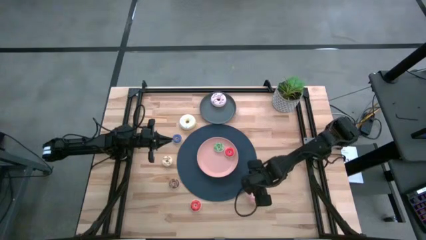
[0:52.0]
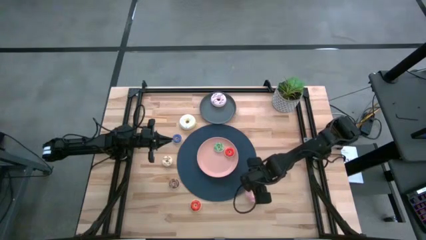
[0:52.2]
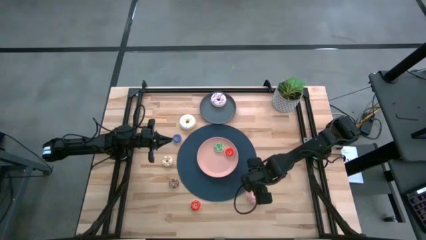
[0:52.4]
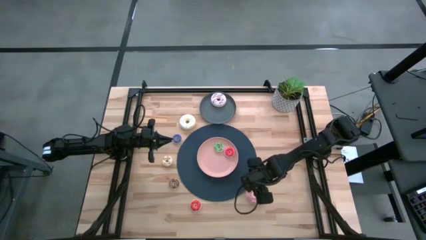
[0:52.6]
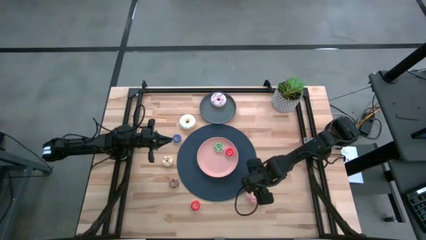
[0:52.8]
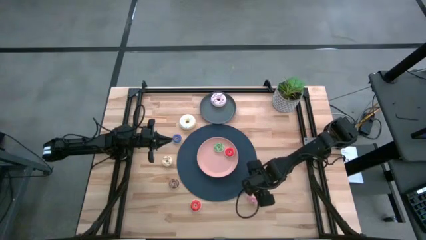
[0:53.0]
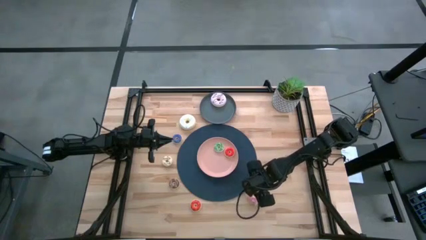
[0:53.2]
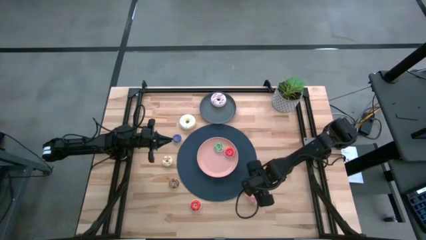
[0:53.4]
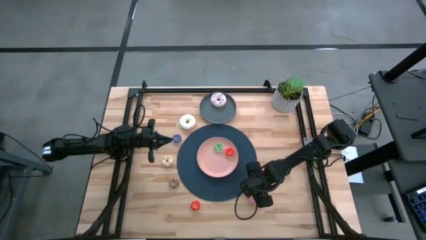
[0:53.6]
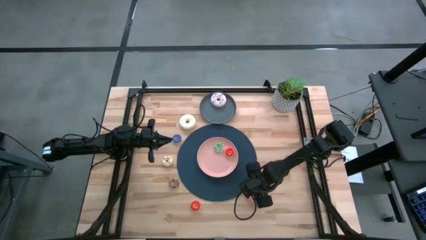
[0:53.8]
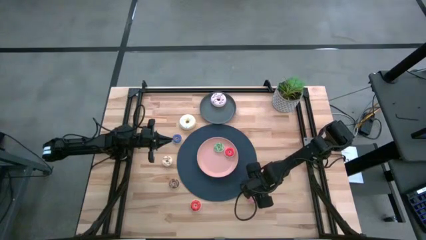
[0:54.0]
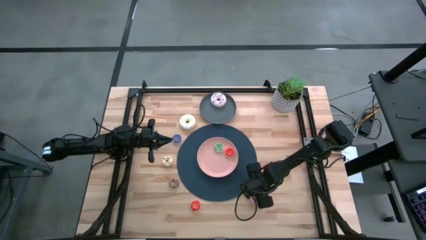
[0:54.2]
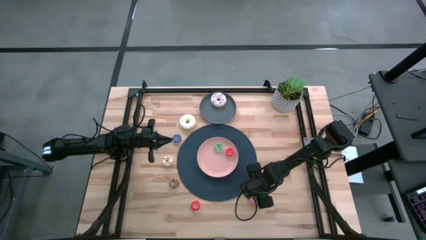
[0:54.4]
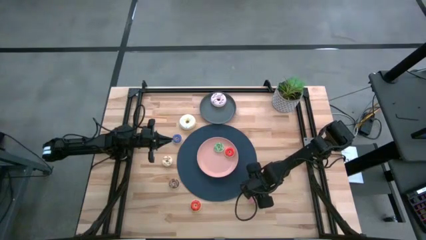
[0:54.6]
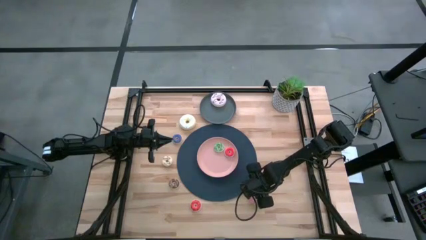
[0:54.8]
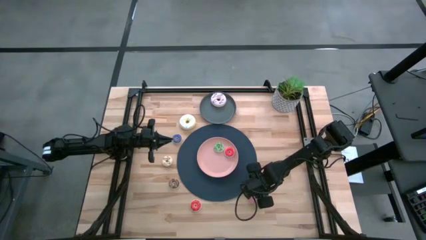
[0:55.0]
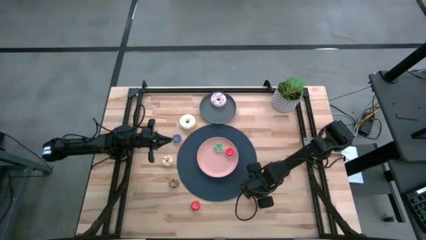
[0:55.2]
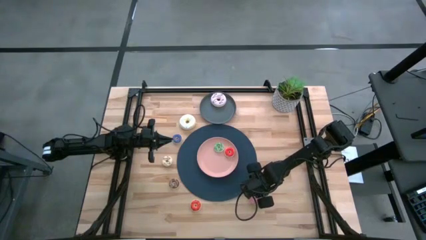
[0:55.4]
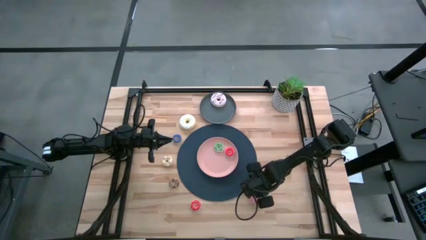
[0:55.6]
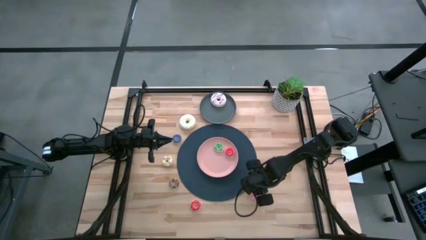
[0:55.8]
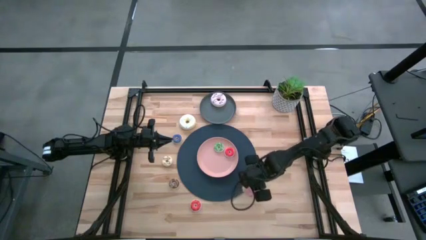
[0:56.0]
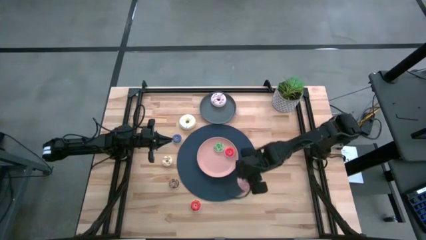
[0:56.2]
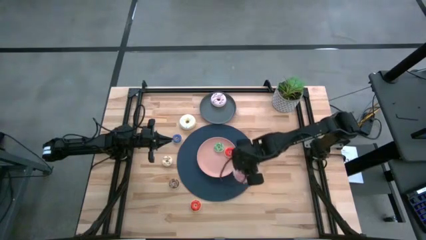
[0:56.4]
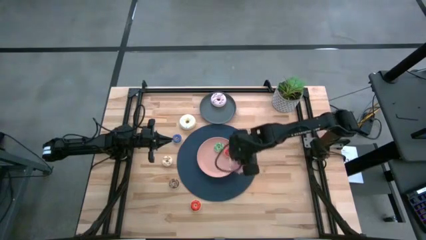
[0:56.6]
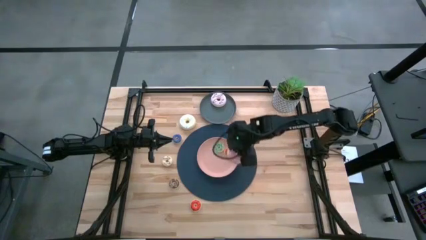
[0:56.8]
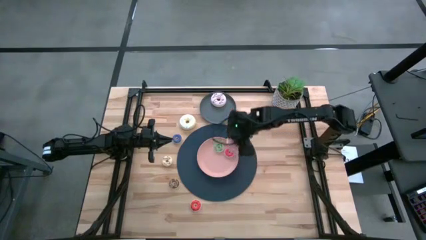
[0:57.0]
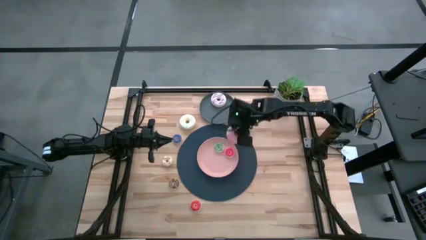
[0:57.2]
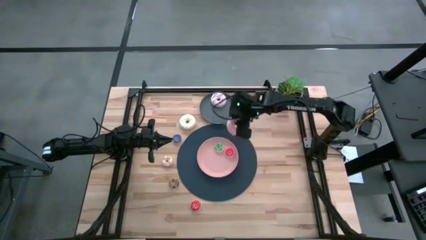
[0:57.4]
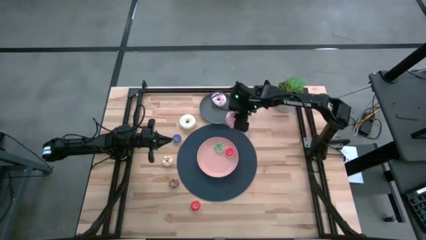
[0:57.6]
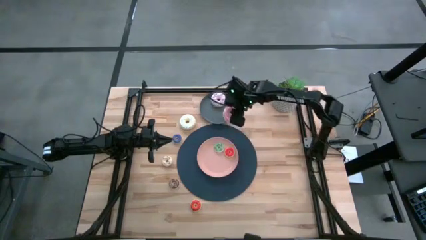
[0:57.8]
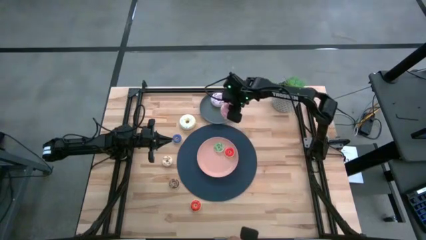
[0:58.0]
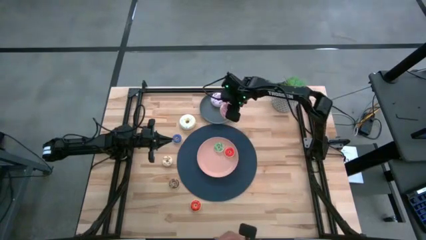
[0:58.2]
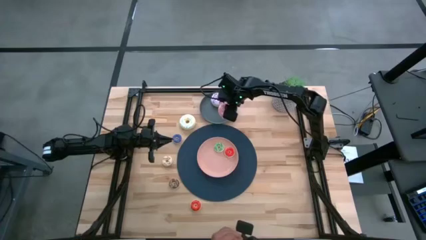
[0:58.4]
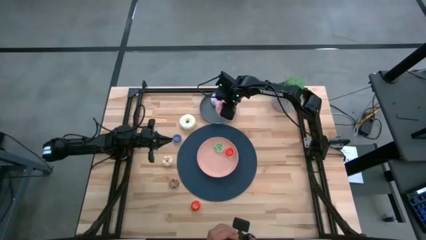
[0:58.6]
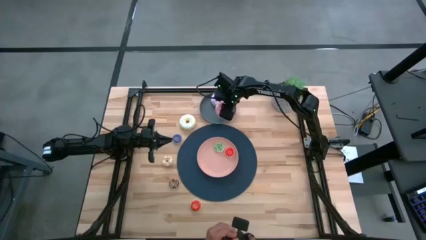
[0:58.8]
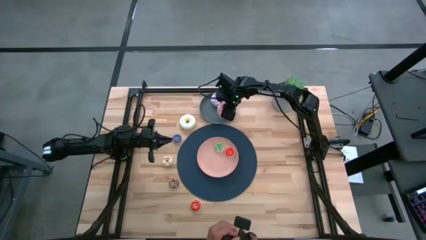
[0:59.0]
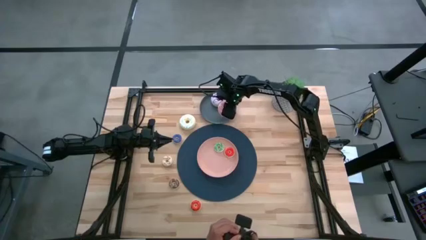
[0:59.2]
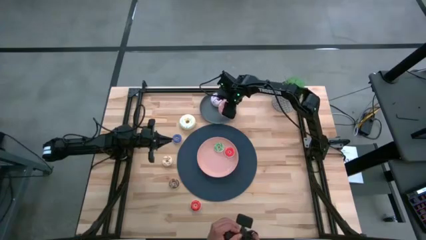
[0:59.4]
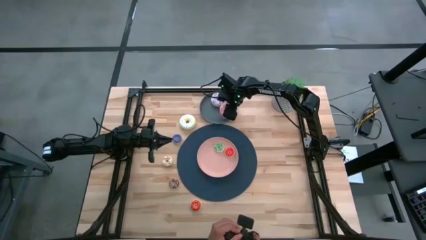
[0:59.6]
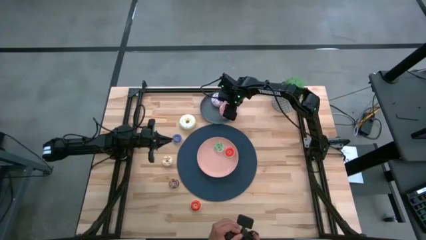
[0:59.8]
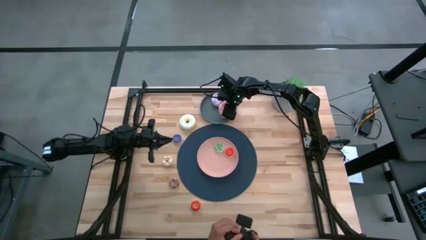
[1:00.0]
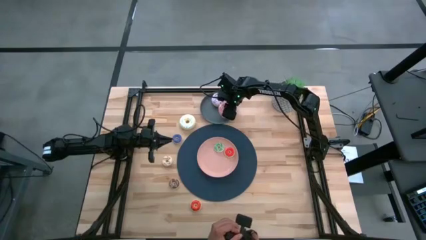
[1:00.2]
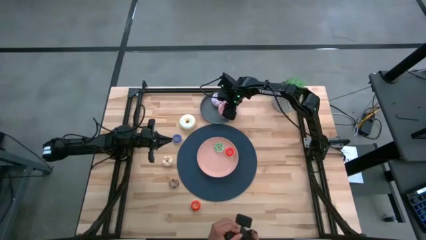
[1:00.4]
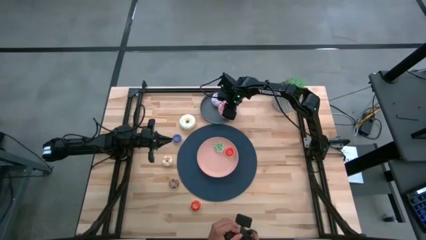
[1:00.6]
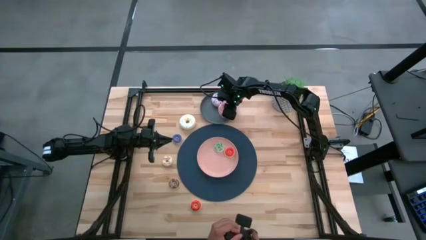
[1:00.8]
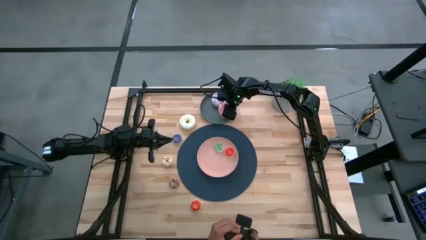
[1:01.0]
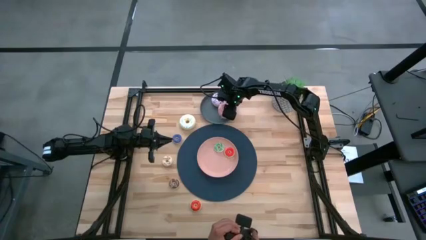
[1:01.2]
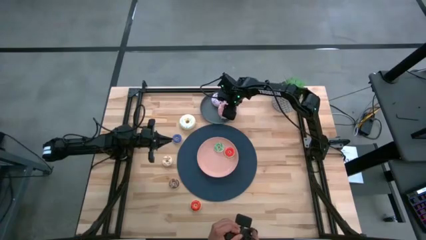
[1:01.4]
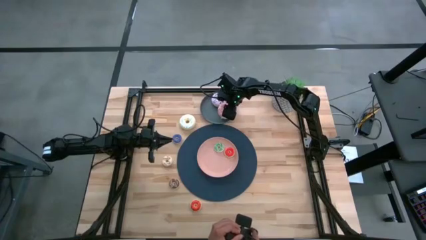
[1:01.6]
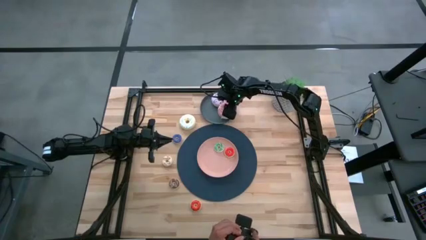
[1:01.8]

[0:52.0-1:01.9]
Task: Pick & Place donuts
Put the large pink donut on the gray plate

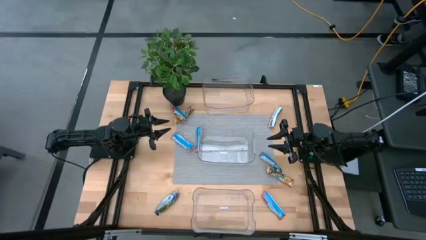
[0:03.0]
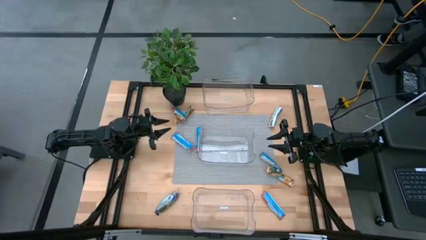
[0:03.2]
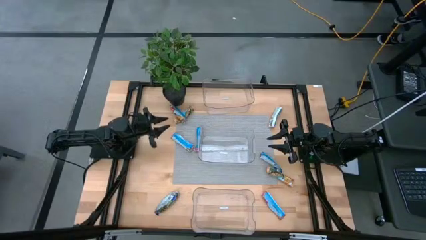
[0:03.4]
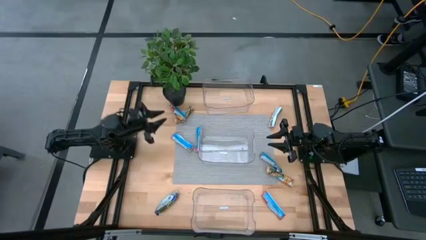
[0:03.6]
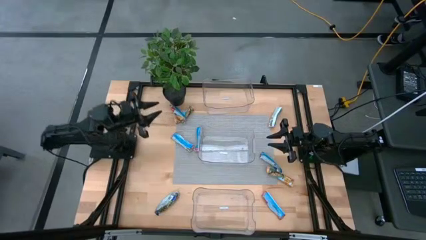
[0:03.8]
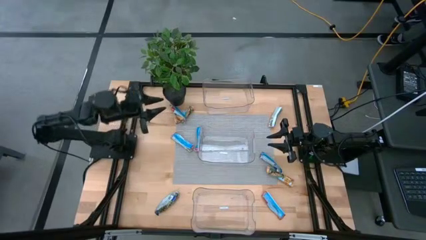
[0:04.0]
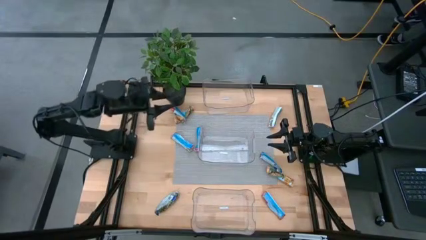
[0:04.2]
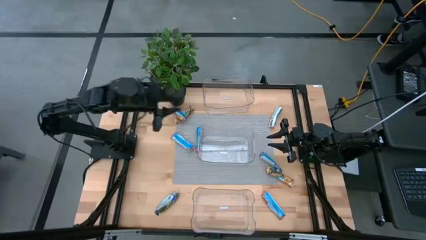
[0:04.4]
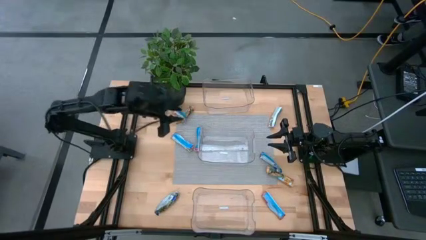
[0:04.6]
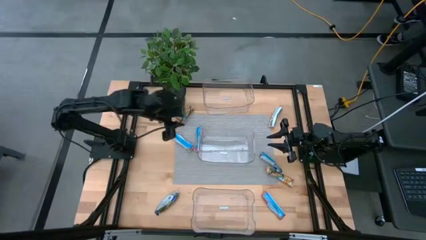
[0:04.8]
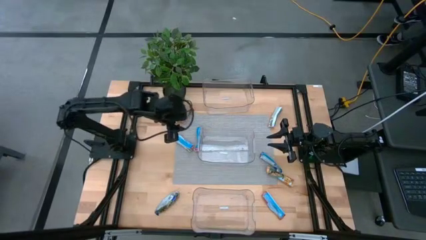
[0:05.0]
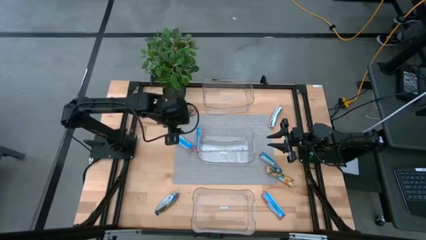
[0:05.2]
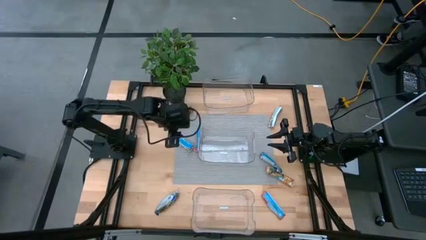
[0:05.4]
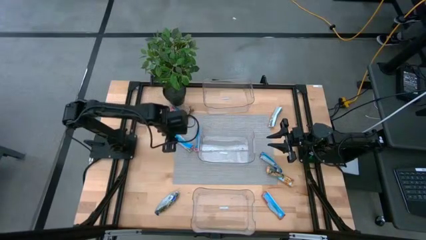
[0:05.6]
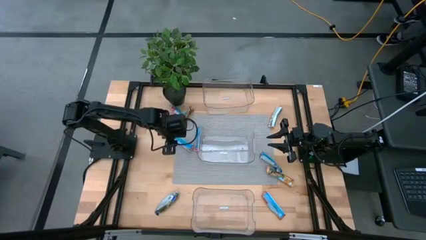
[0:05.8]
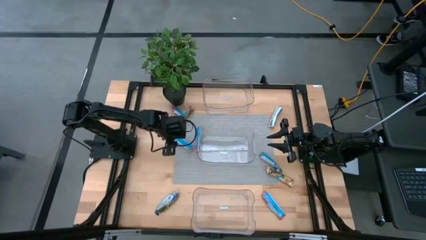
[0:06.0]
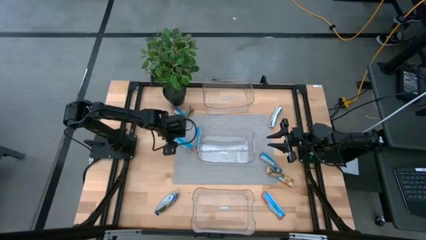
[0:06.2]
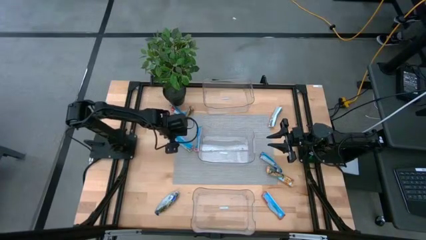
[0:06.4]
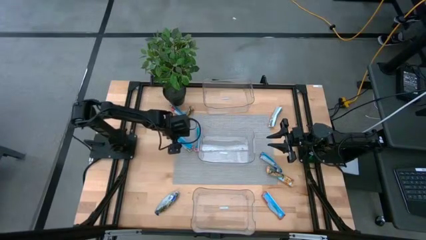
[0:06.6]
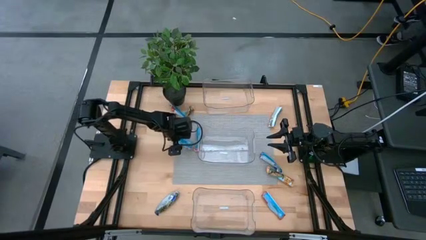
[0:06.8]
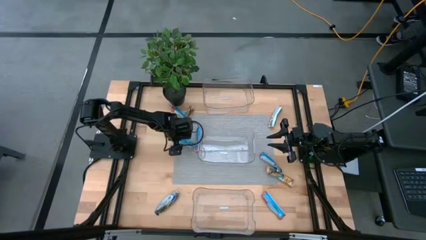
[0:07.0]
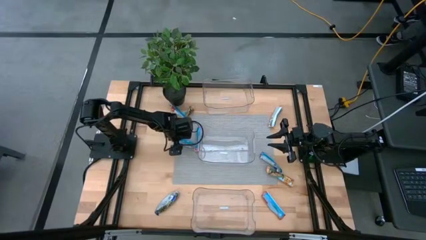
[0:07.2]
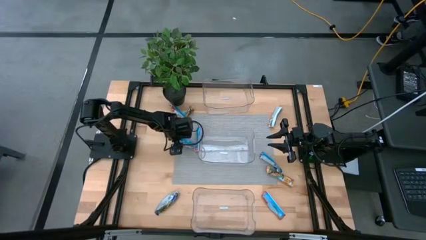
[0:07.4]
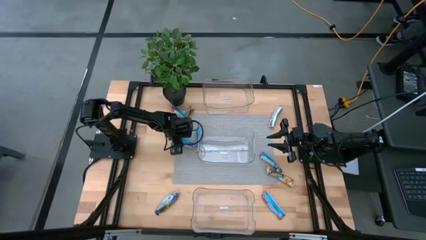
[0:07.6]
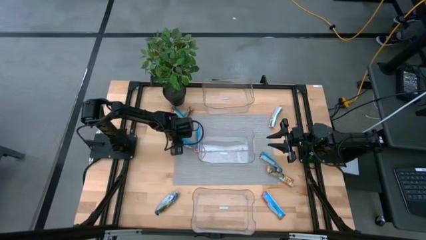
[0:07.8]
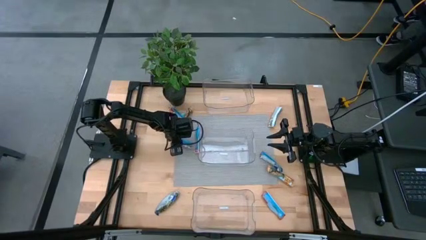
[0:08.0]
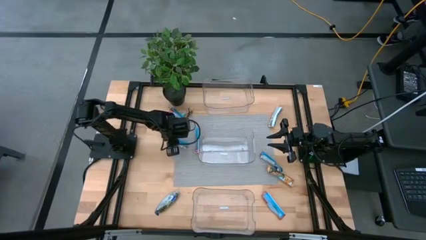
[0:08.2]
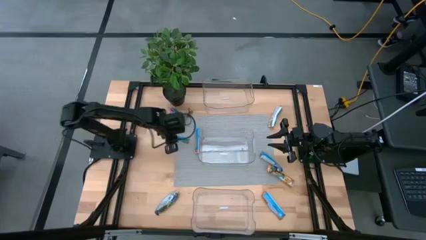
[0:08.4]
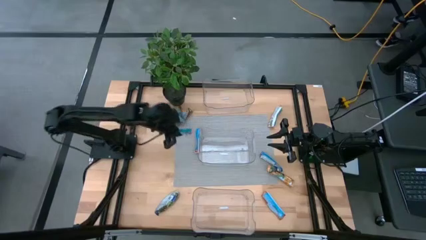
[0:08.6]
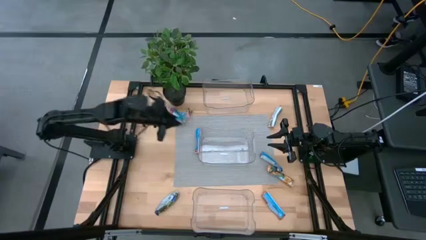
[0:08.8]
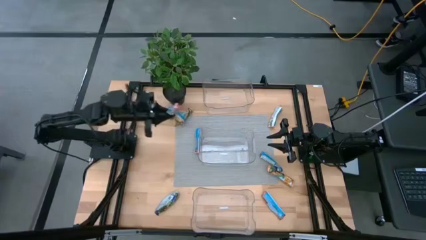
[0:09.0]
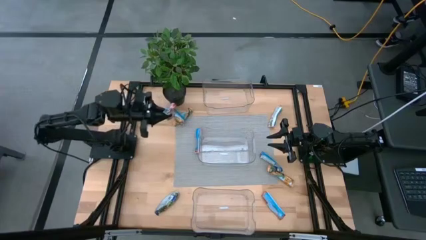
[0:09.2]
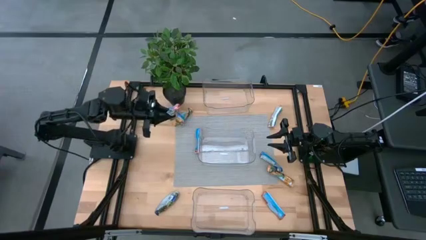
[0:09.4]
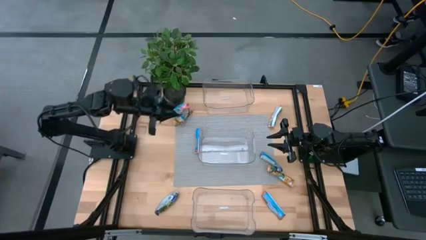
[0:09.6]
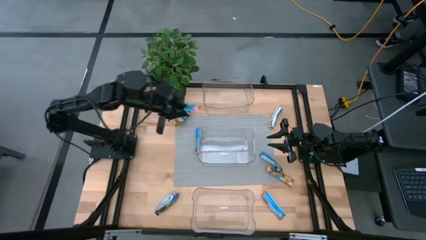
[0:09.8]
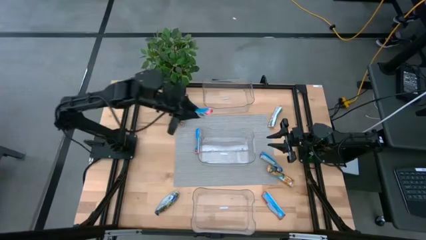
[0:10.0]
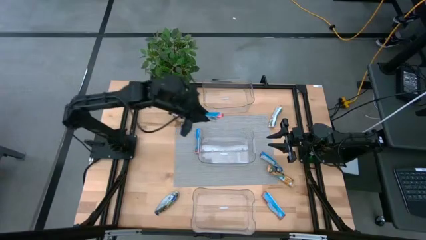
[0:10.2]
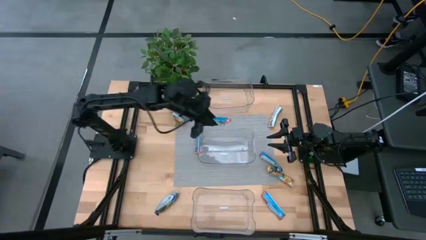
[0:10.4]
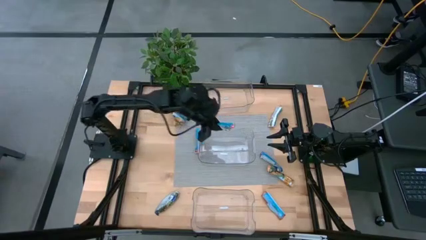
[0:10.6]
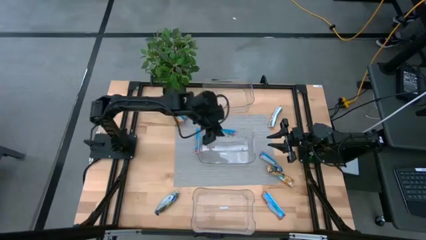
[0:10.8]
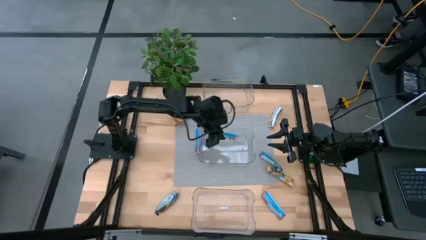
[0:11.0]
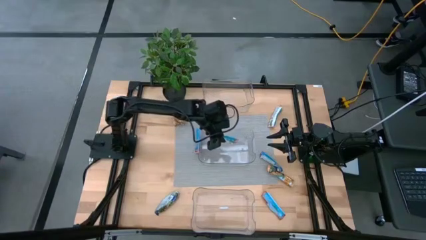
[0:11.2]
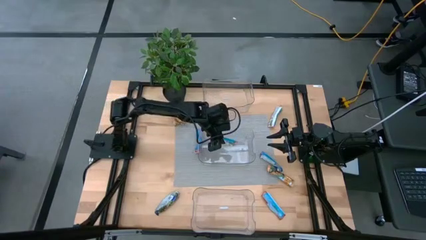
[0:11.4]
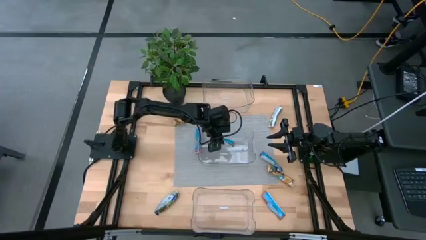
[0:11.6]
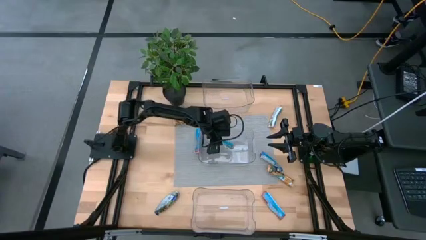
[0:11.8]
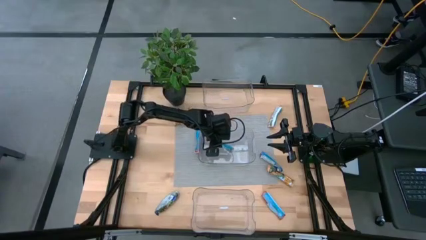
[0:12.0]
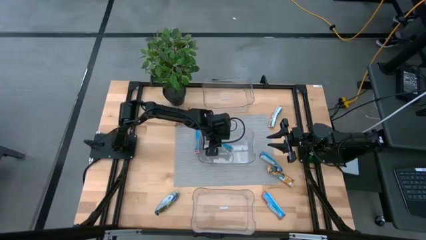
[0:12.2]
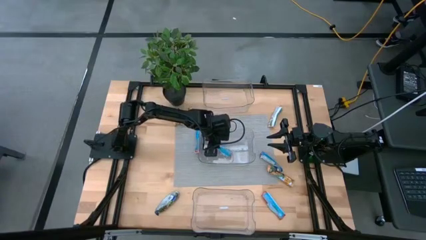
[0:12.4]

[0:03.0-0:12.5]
Task: Pick and place Granola Bars by type
Put the red granola bar into the middle transparent bin
